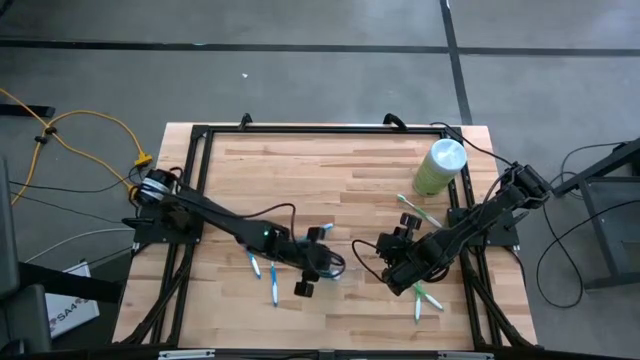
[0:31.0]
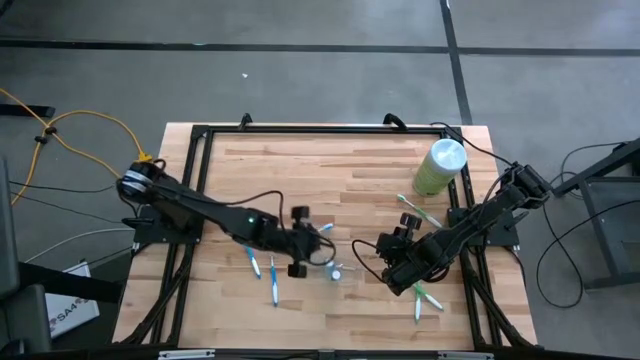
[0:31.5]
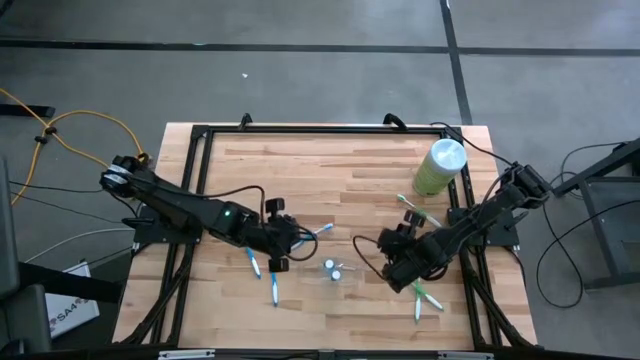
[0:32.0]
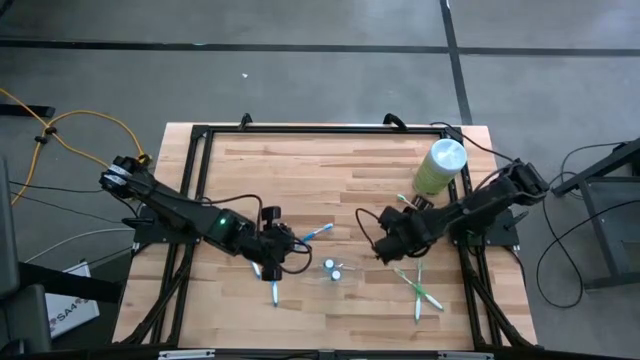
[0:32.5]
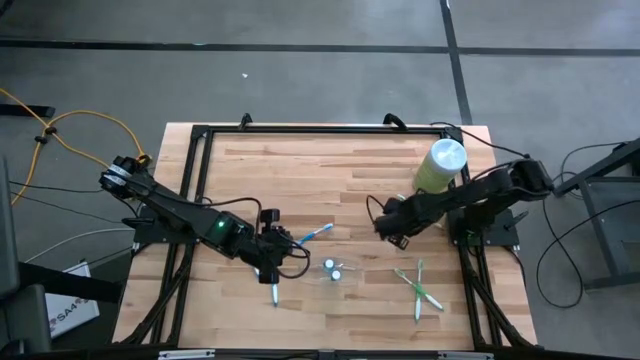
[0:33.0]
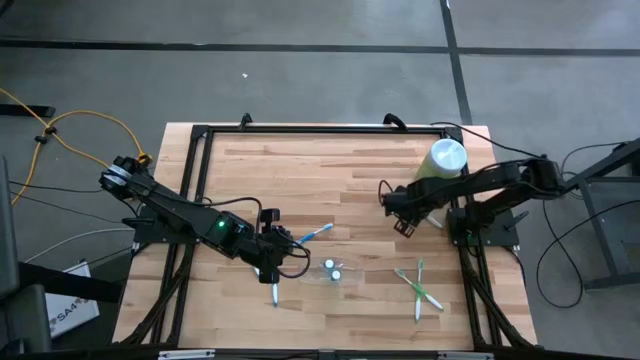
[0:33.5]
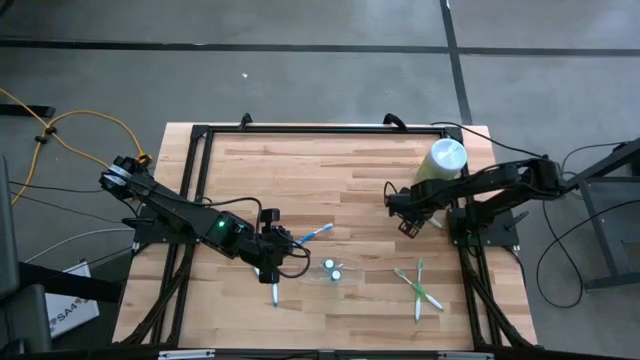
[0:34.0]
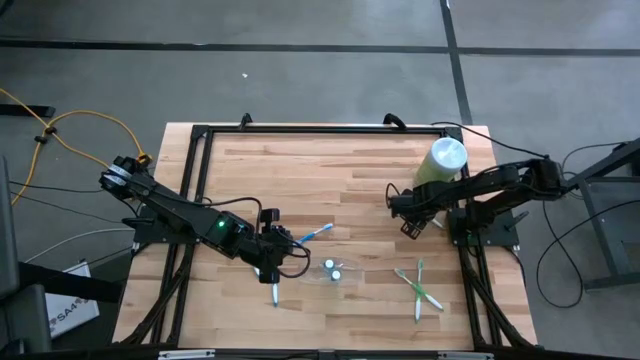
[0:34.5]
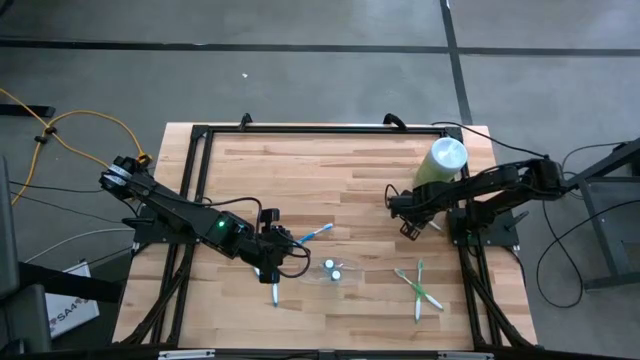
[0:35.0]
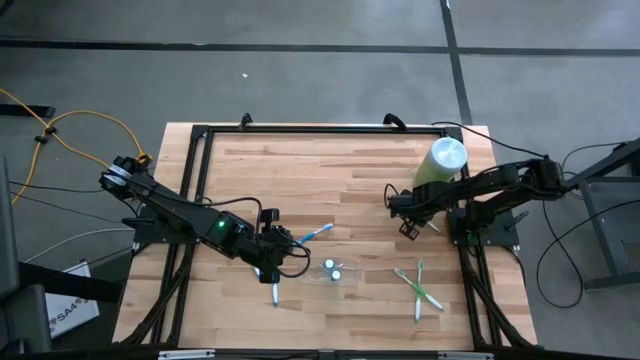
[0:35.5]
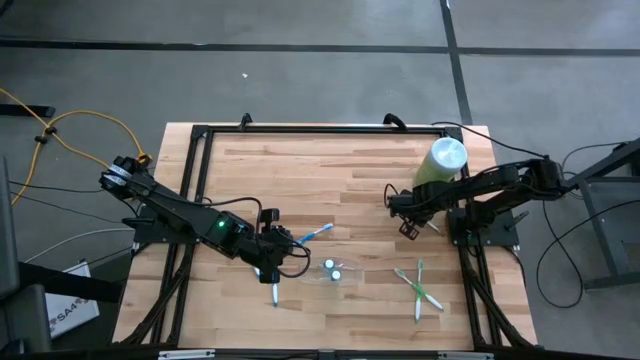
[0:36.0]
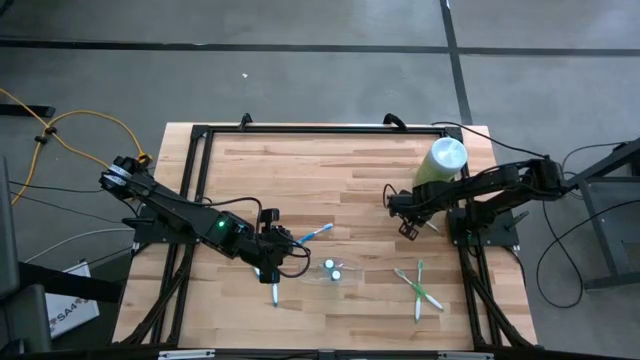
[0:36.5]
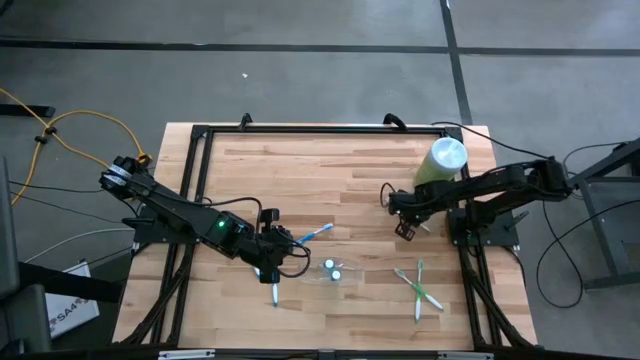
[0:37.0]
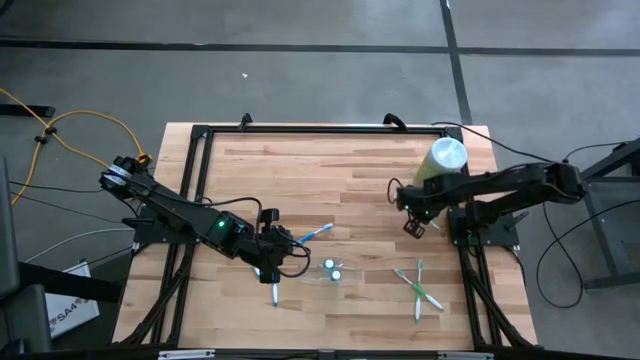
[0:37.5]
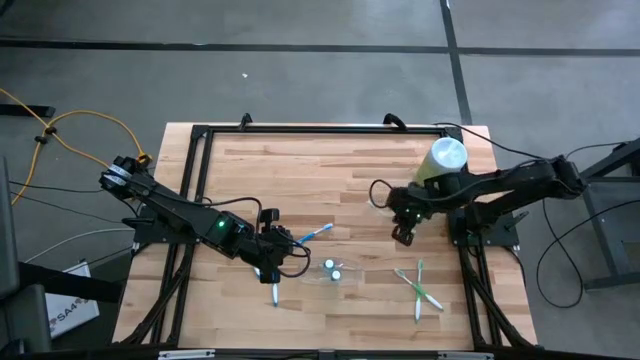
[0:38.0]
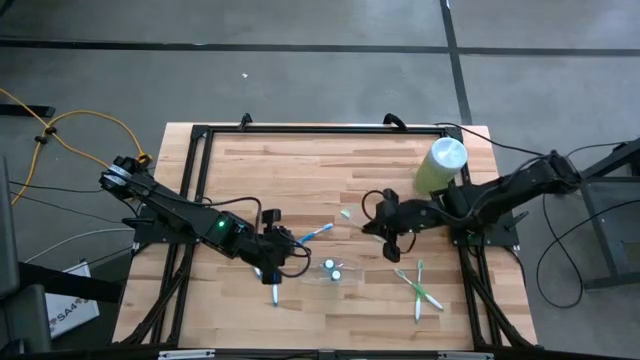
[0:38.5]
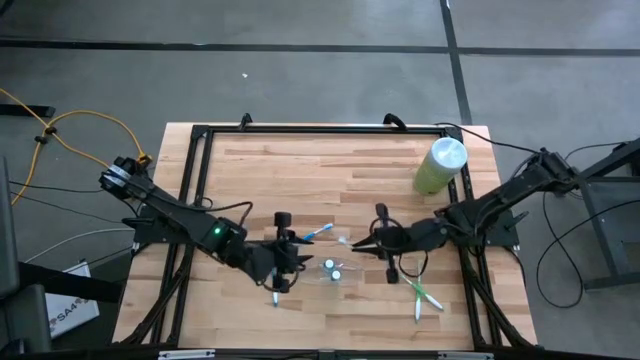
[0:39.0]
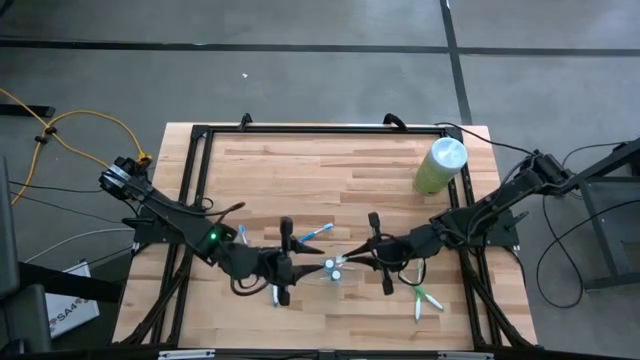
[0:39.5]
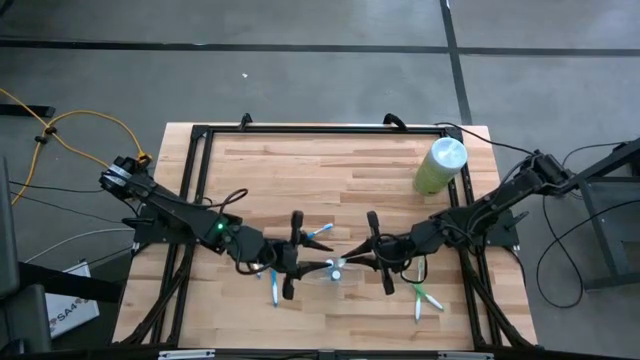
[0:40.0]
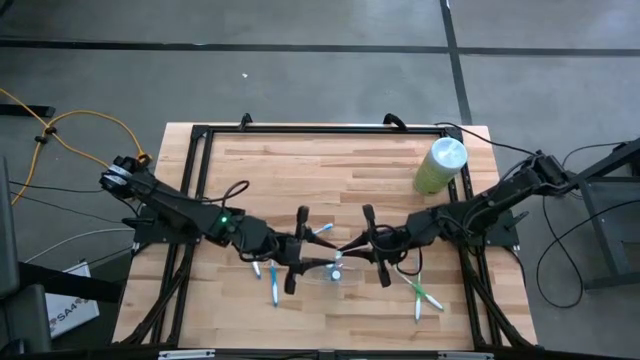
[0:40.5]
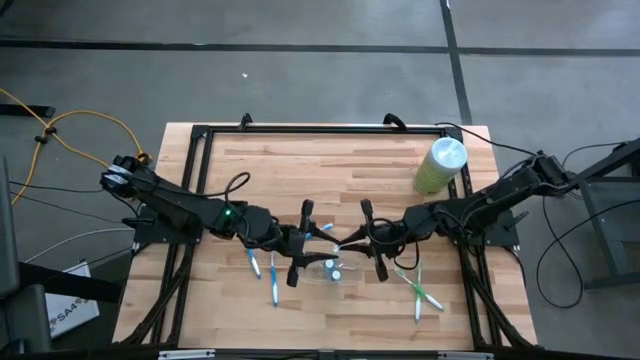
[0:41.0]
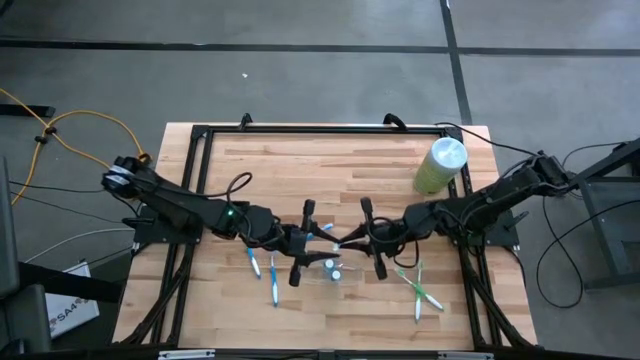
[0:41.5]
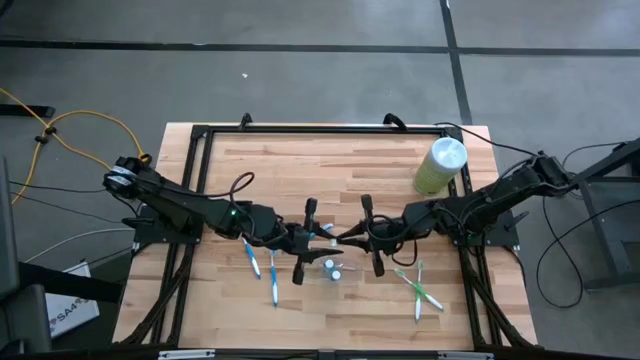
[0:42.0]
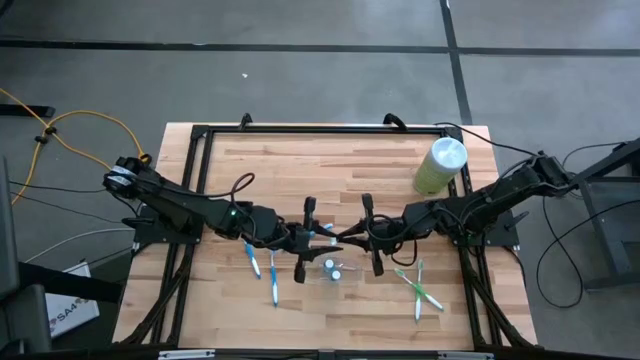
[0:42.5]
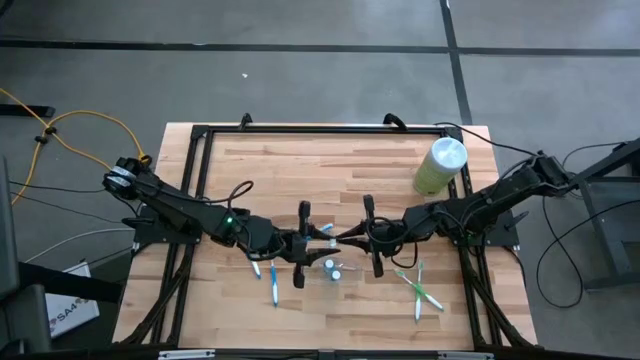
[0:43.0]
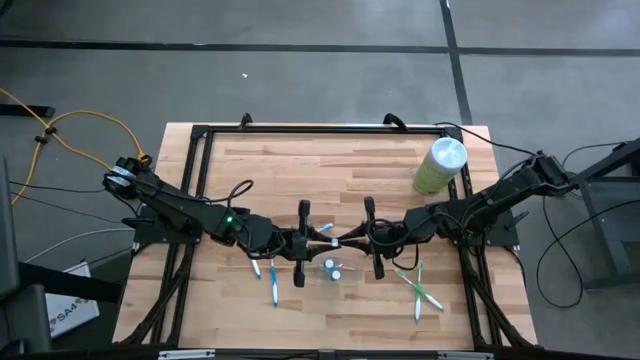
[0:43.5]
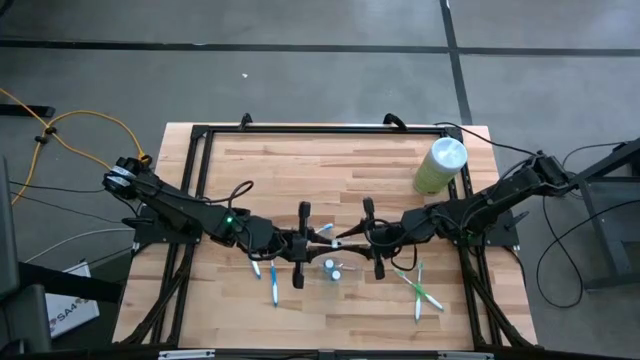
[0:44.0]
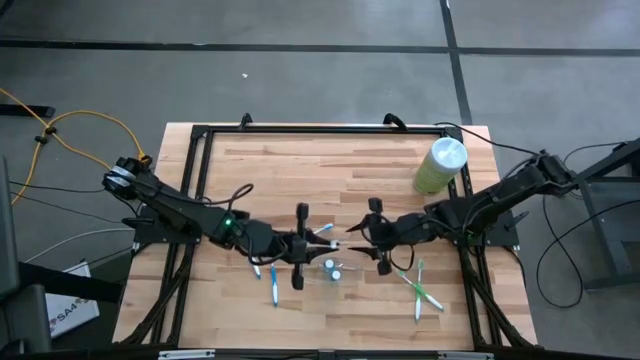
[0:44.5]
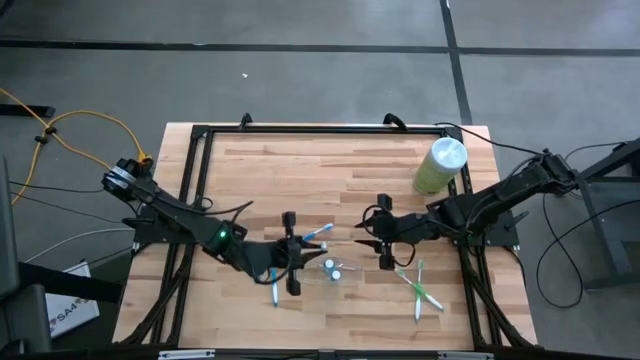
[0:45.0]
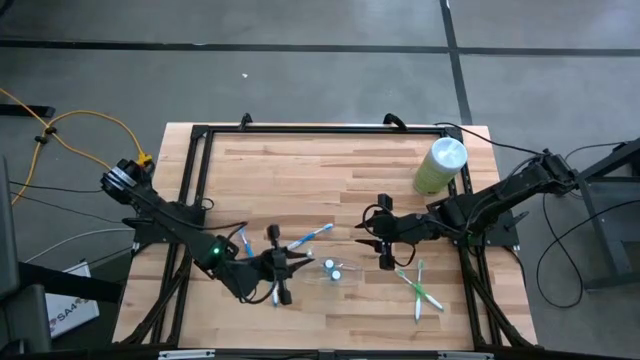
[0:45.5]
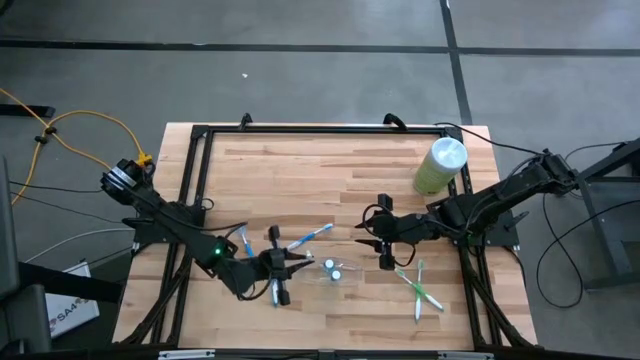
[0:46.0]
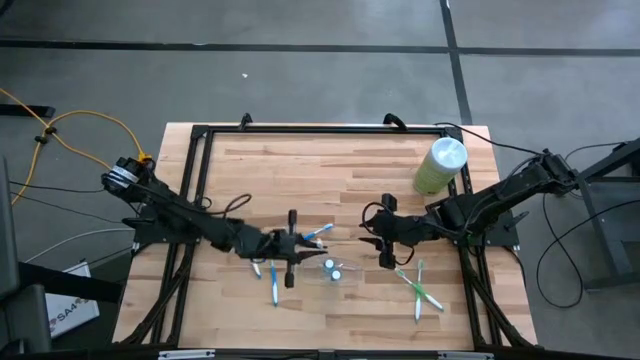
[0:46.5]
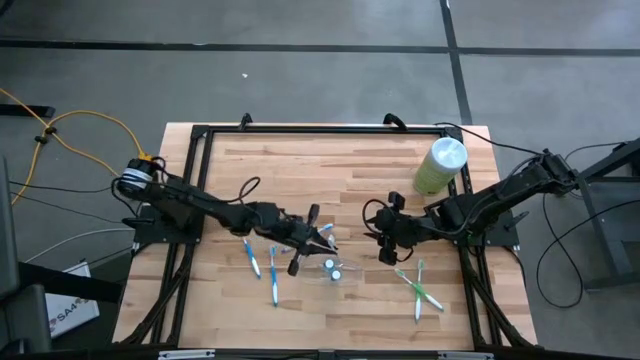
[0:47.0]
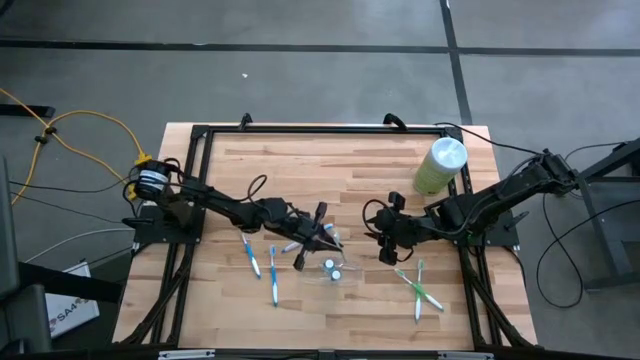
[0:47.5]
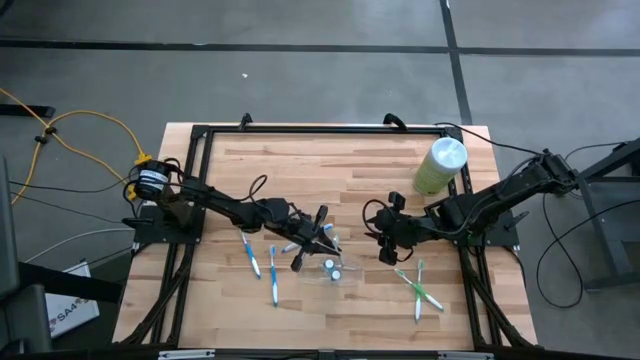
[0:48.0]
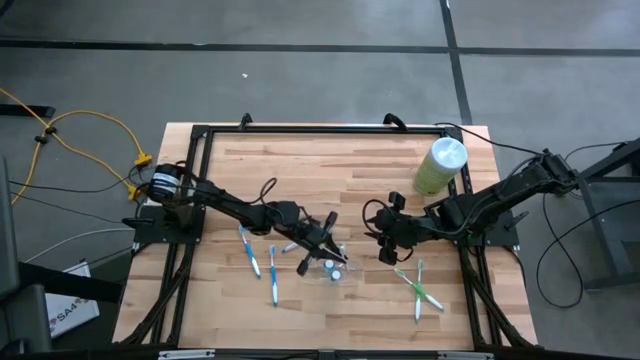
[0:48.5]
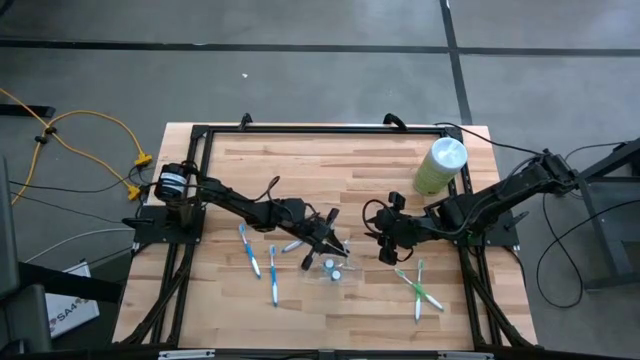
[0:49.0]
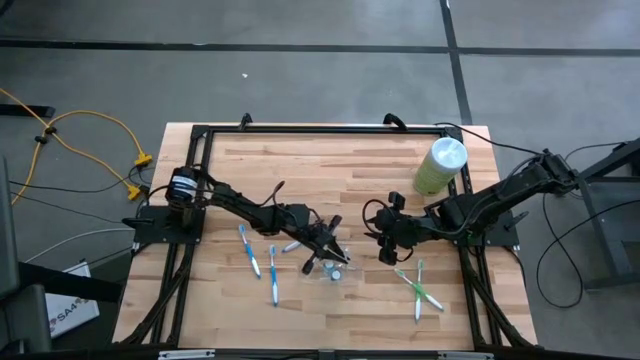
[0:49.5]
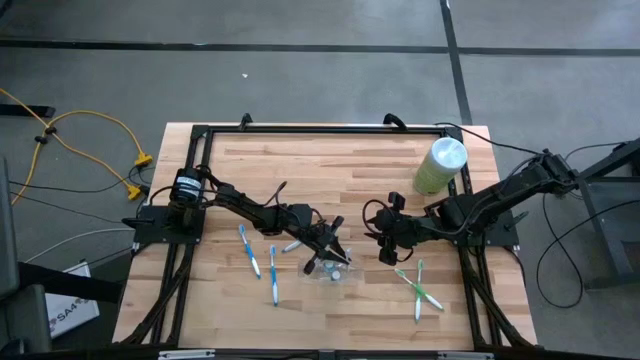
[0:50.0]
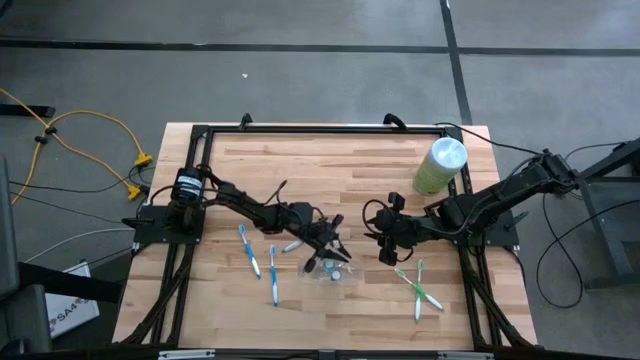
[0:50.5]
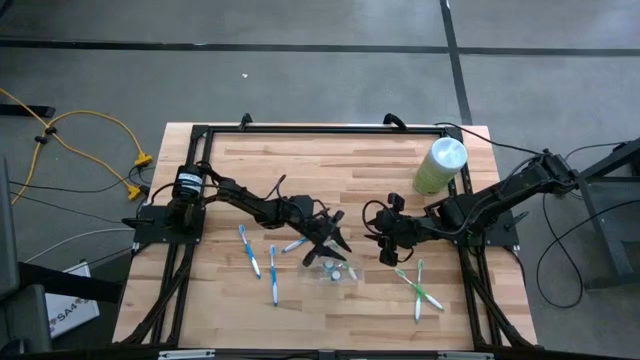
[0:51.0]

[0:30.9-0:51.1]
Task: Pick & Place toothbrushing station
Put the top green toothbrush into the transparent organizer
